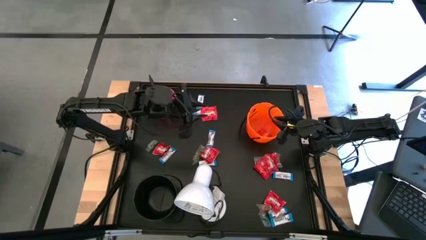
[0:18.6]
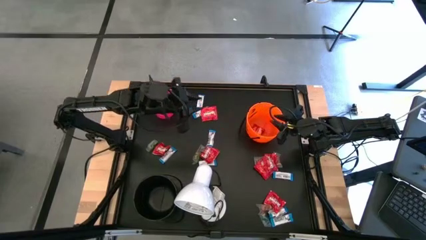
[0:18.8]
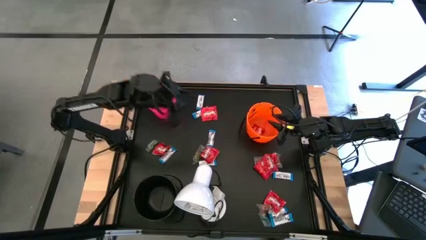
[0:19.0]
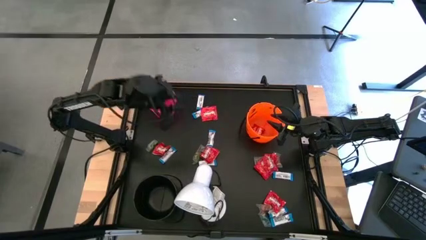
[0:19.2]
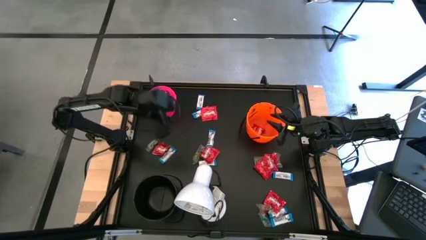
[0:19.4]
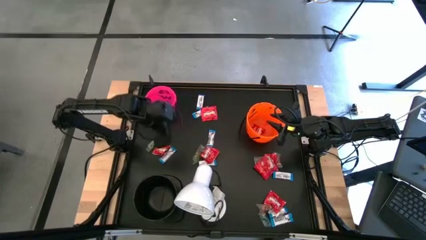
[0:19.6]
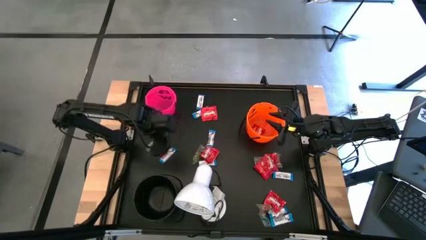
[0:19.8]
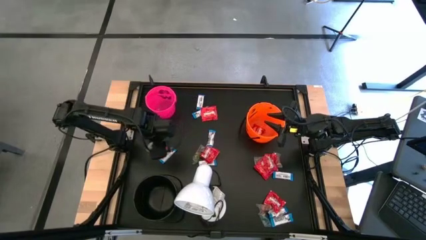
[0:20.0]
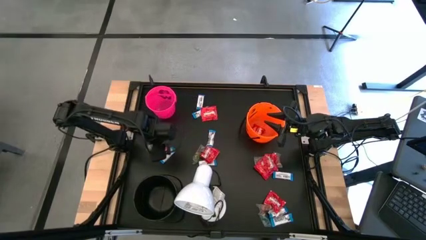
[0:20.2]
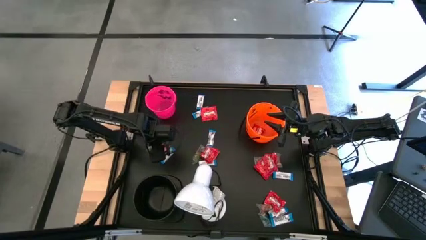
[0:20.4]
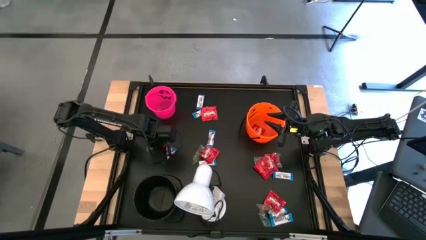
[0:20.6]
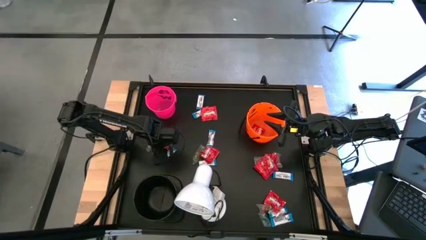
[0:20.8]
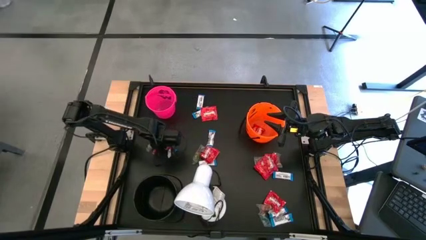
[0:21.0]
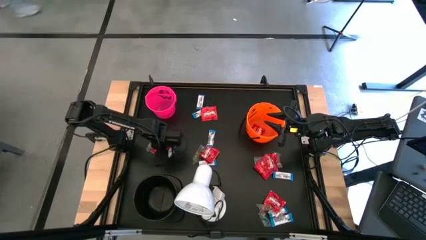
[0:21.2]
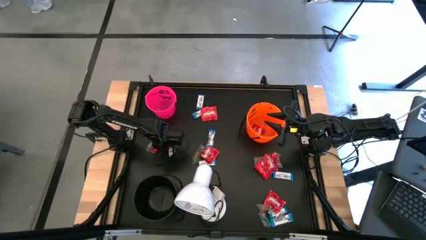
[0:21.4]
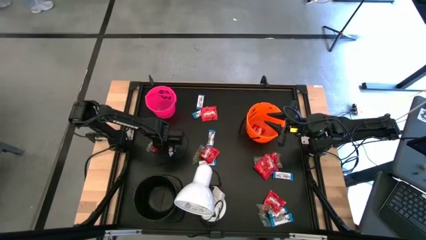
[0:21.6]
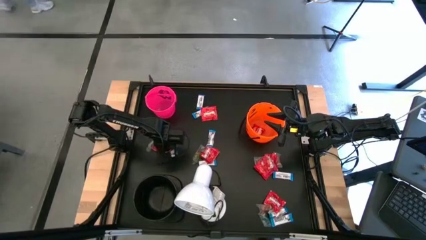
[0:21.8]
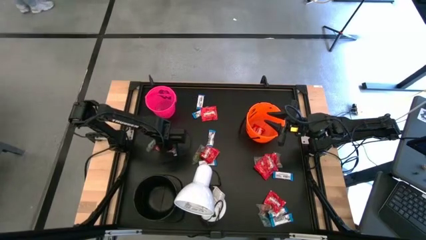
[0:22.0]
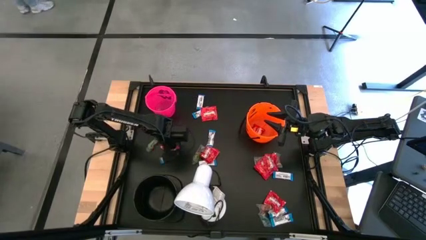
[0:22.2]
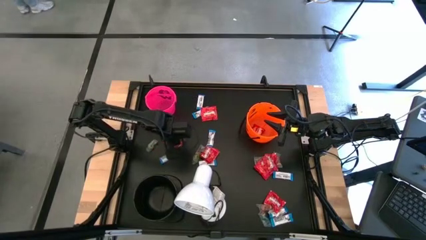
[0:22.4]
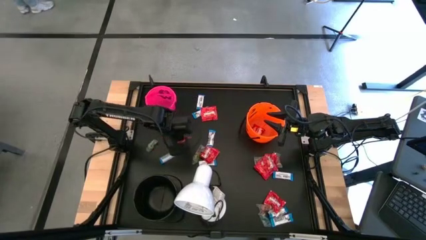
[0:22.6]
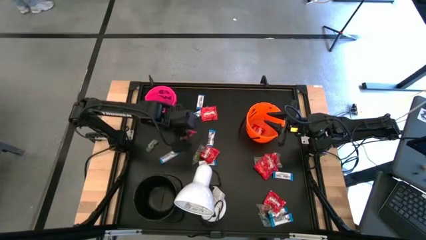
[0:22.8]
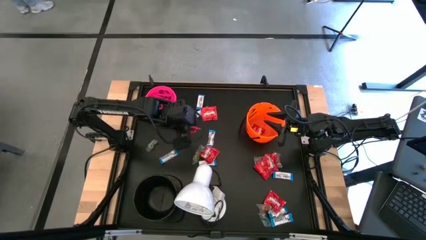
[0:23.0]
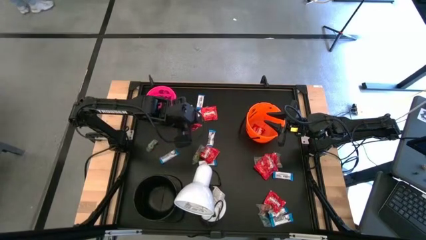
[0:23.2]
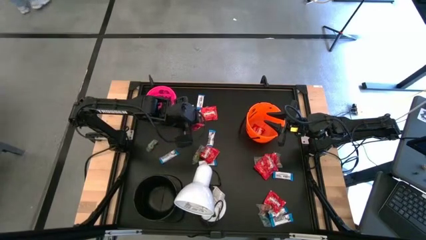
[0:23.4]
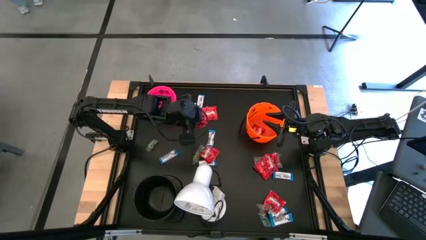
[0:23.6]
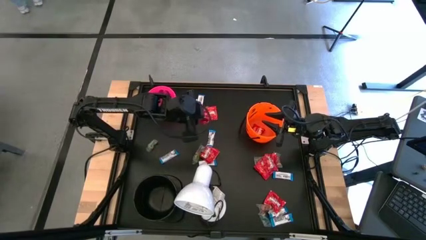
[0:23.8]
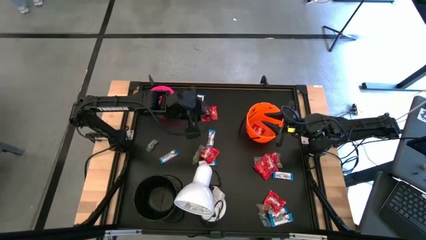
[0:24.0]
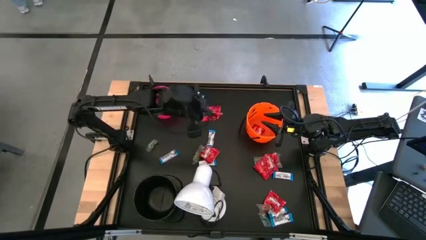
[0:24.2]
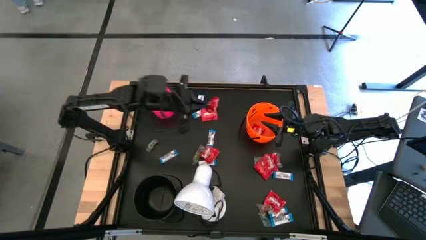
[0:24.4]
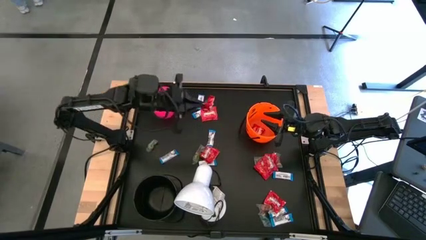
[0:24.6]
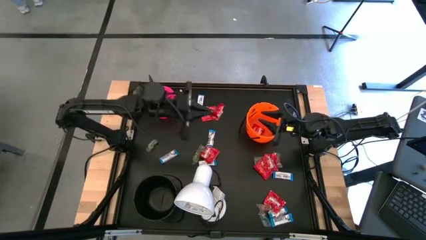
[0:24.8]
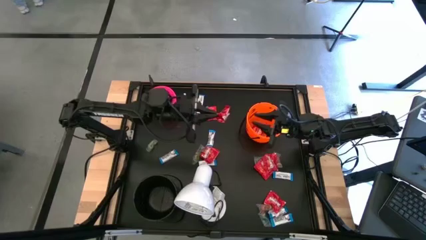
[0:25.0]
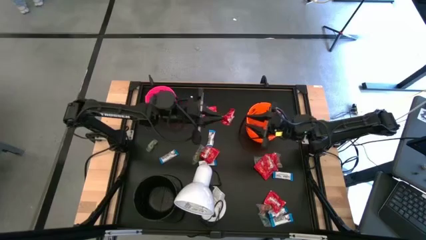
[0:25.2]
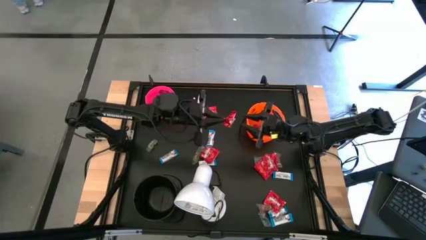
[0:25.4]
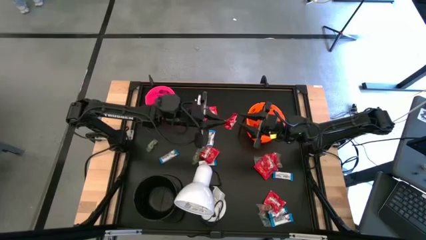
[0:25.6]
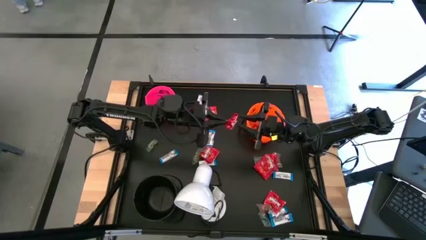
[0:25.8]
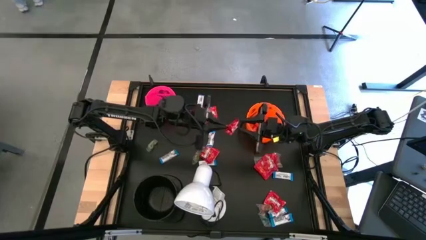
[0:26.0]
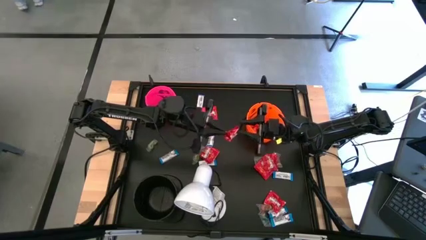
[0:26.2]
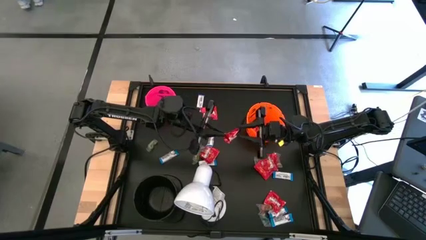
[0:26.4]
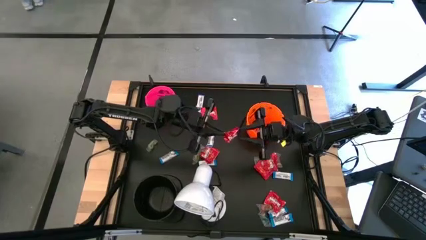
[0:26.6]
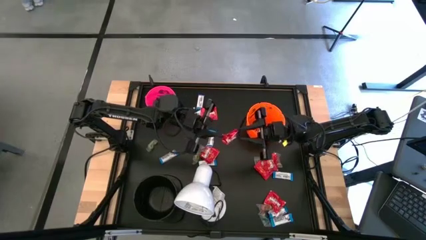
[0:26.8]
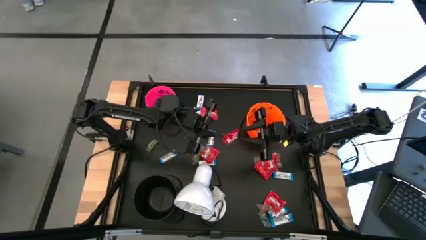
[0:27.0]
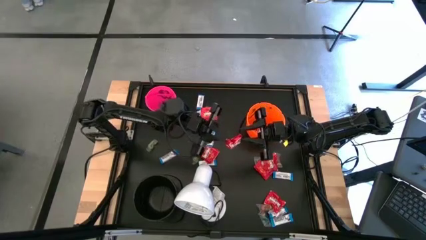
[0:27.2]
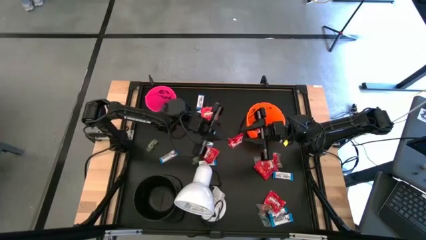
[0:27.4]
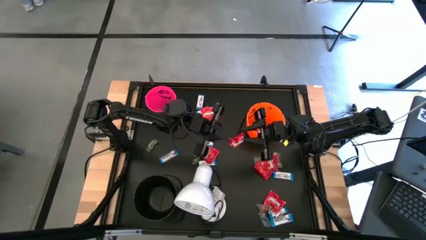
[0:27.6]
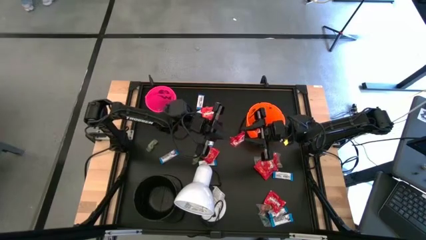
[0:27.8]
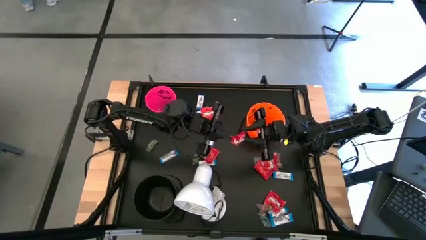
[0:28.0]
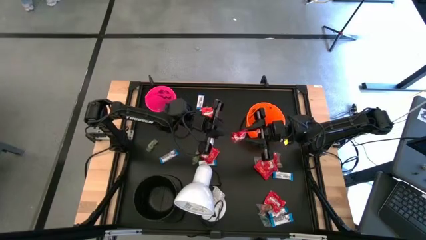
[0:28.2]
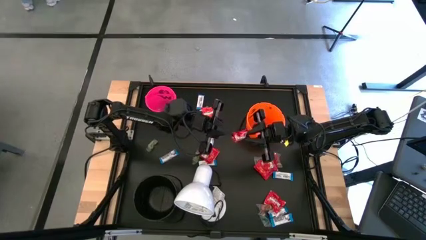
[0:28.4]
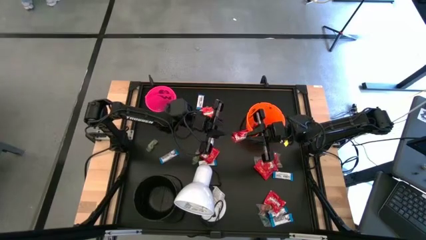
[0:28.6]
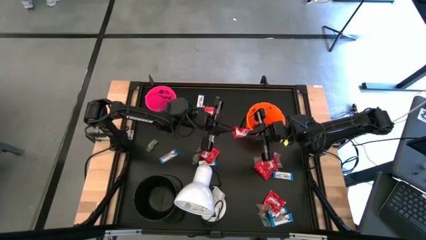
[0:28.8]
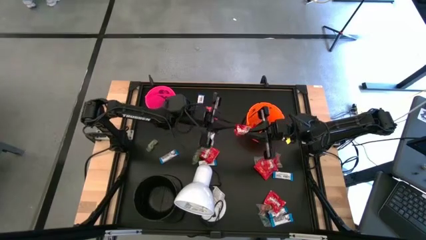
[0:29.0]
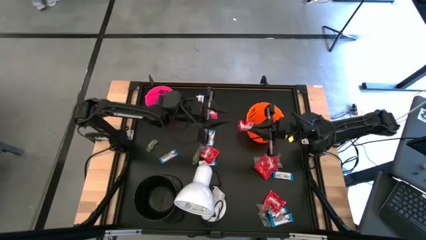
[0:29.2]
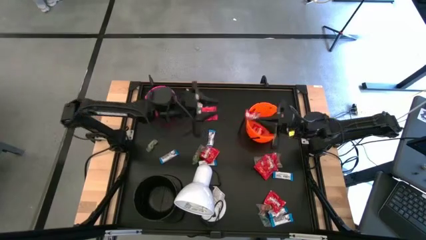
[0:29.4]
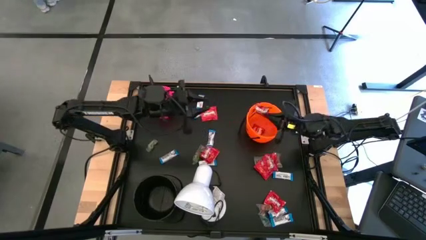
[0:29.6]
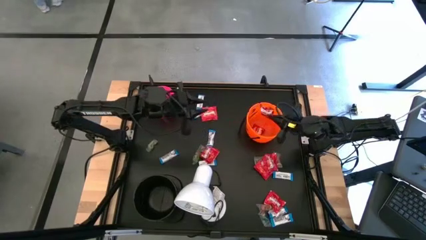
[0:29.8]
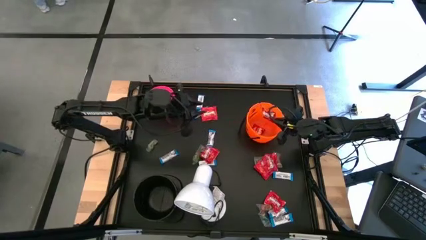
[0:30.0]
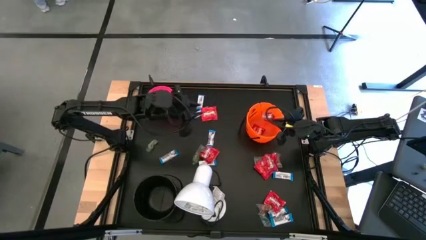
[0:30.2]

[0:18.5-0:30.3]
Task: Sort candy
Put the red candy into the orange bucket

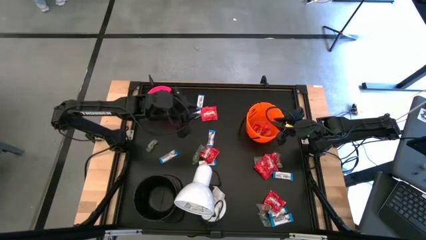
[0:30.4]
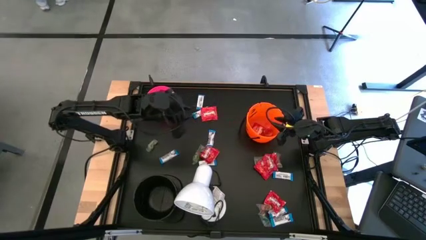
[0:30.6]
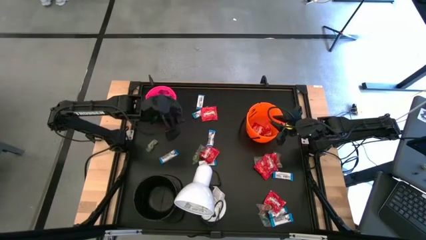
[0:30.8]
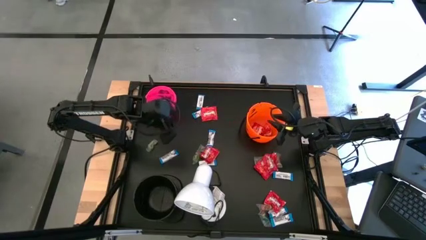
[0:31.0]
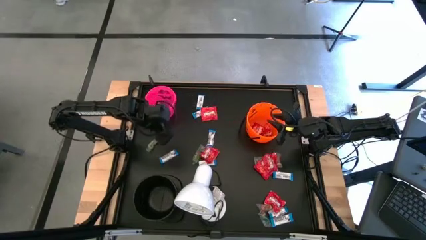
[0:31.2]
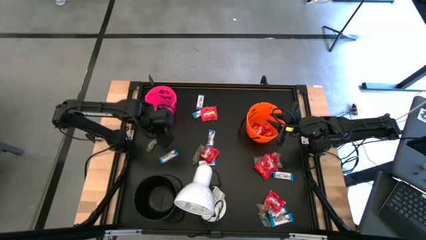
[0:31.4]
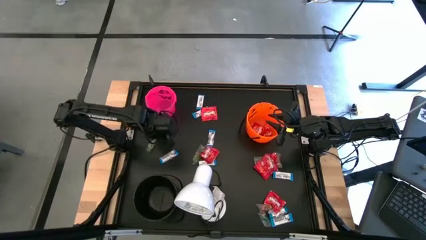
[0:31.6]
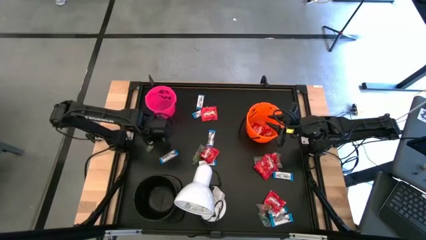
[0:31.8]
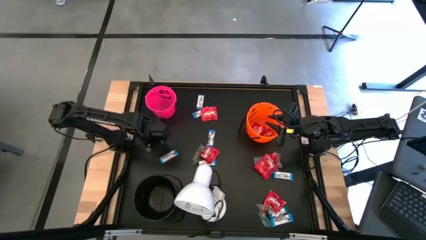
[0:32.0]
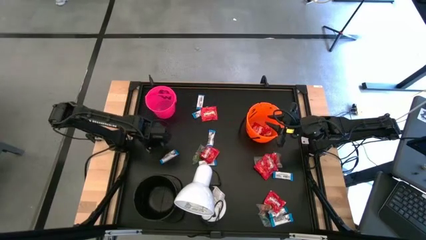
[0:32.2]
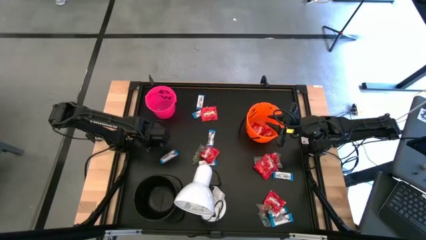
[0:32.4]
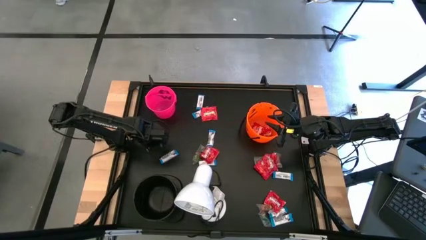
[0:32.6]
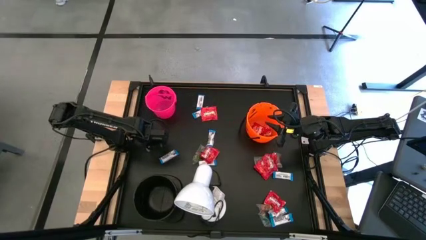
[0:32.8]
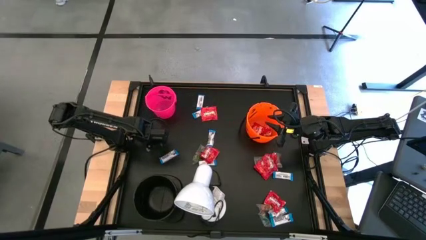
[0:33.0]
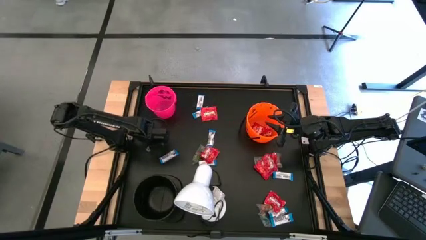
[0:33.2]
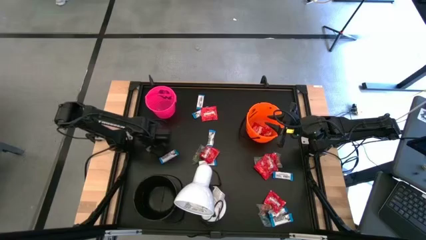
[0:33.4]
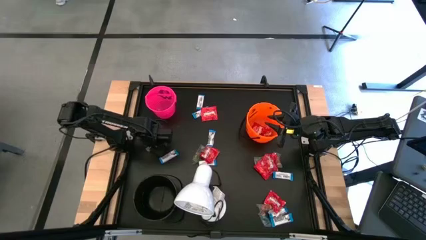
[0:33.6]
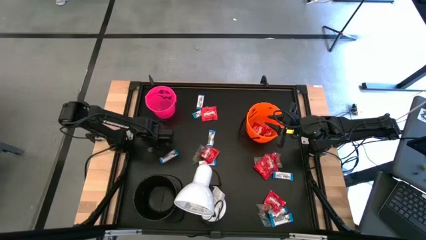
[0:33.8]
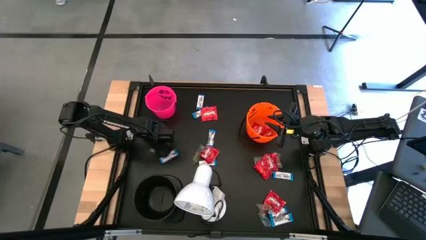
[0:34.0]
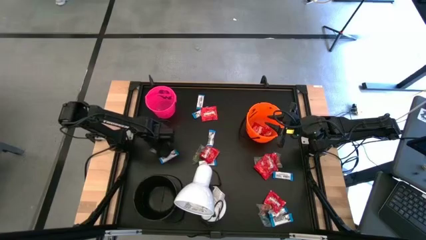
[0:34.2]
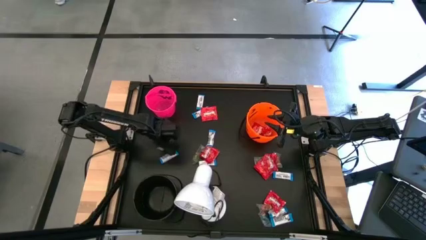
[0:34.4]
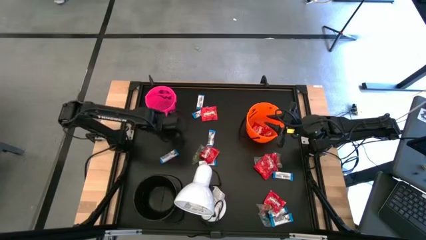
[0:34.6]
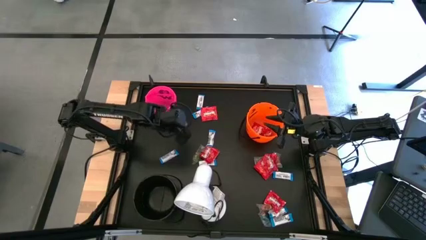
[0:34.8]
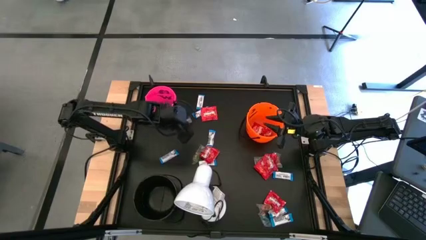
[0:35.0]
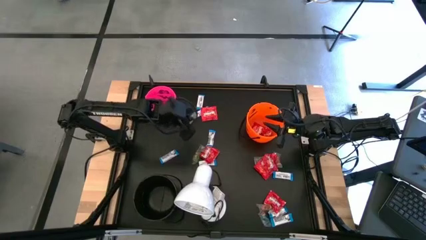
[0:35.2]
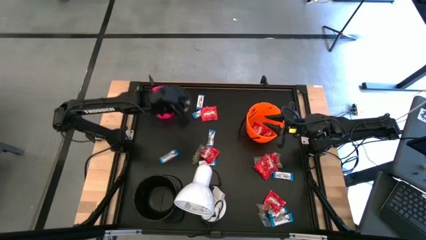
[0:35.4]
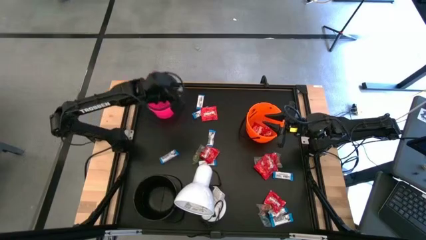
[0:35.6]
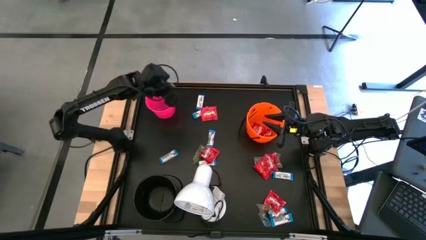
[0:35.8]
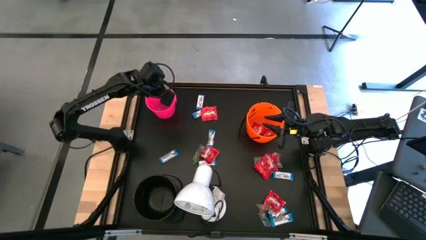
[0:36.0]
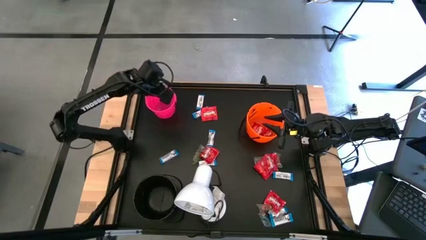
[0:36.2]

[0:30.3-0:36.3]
Put the green gummy into the pink bucket
